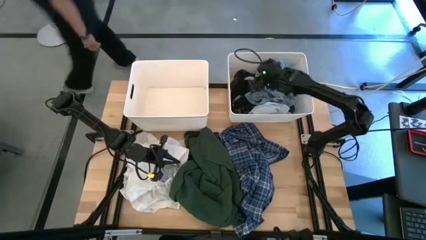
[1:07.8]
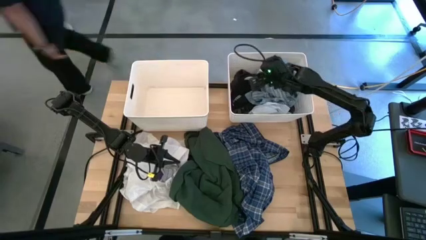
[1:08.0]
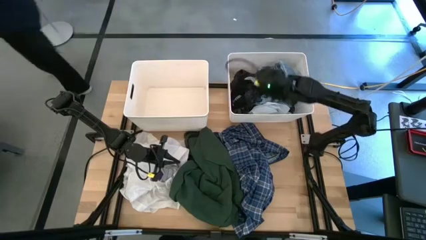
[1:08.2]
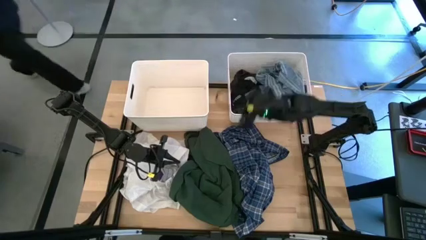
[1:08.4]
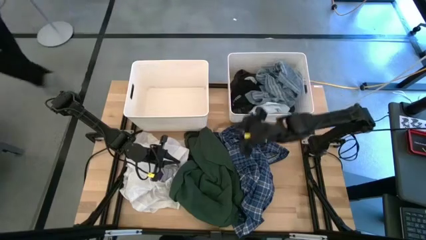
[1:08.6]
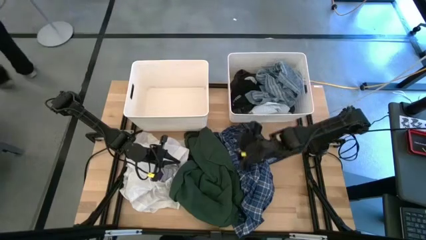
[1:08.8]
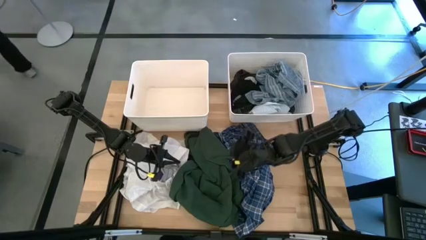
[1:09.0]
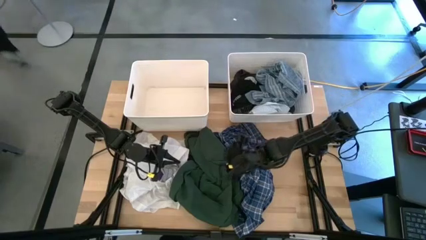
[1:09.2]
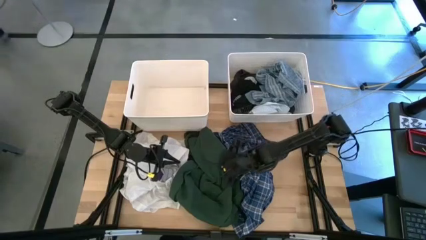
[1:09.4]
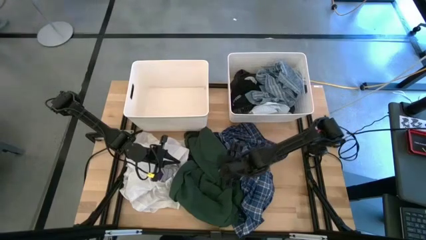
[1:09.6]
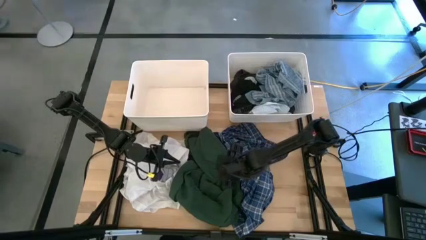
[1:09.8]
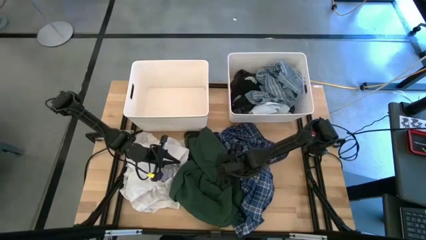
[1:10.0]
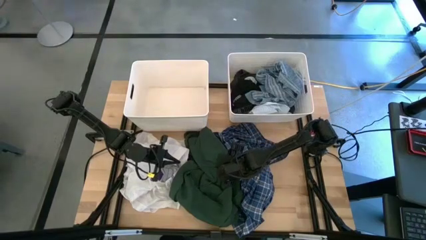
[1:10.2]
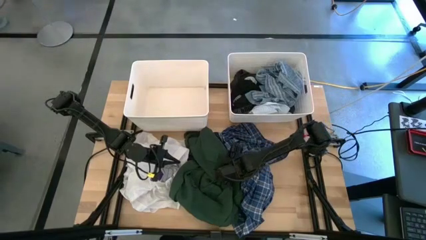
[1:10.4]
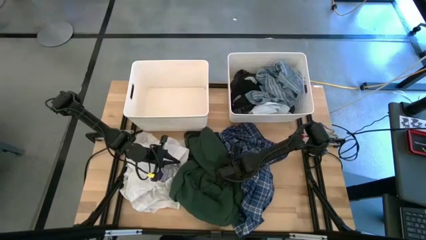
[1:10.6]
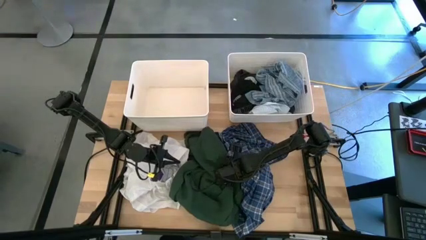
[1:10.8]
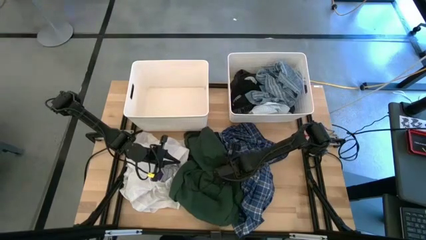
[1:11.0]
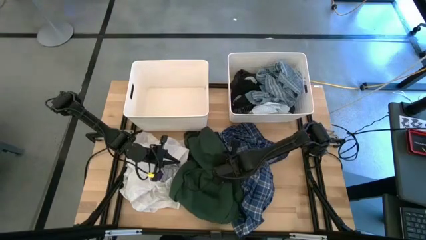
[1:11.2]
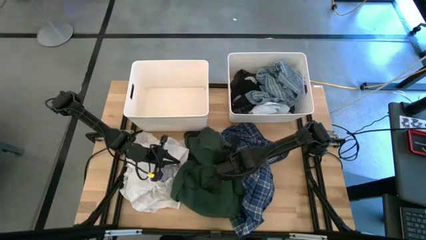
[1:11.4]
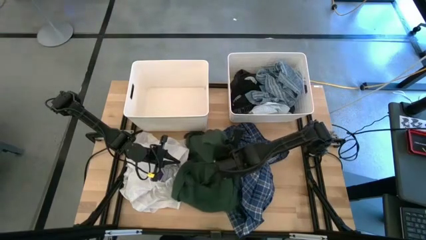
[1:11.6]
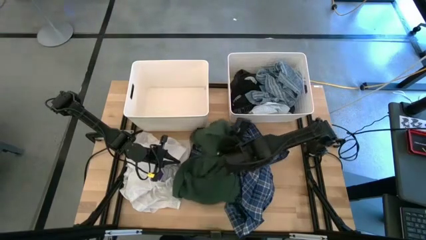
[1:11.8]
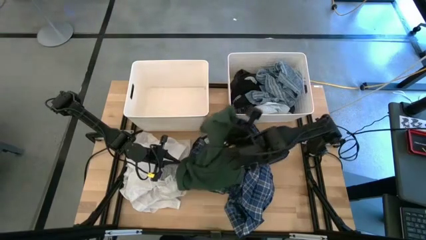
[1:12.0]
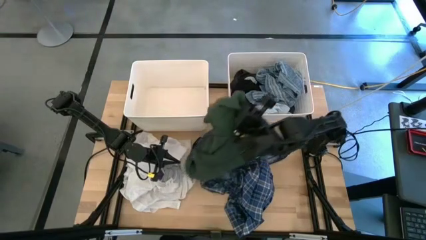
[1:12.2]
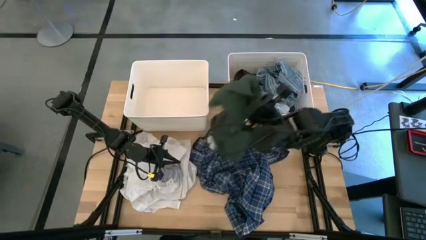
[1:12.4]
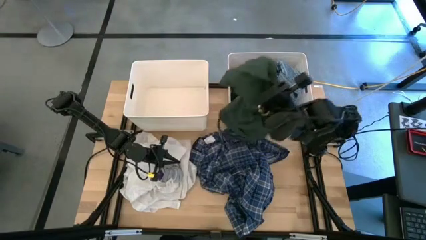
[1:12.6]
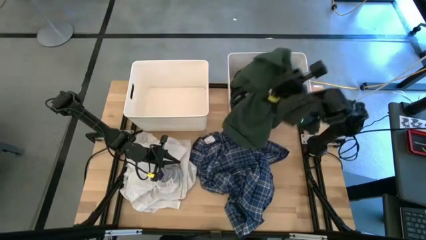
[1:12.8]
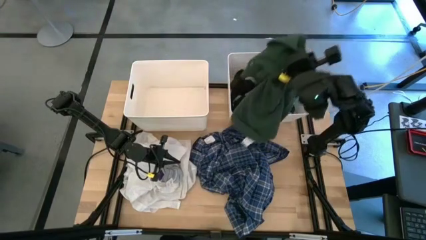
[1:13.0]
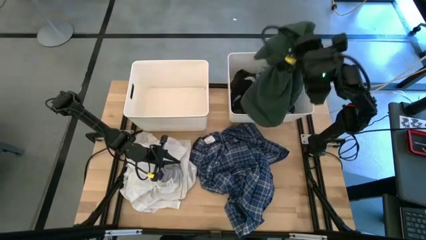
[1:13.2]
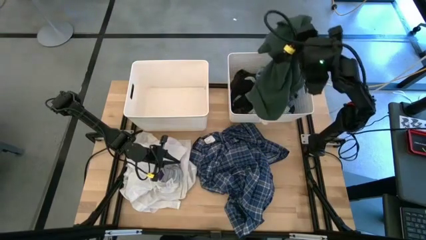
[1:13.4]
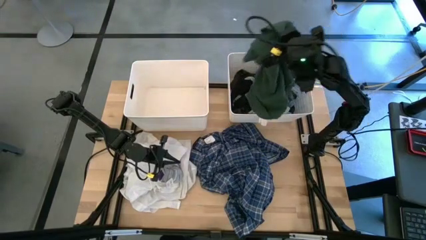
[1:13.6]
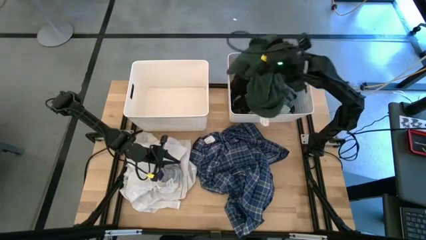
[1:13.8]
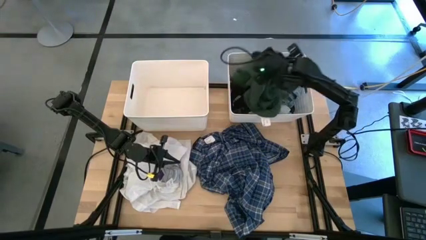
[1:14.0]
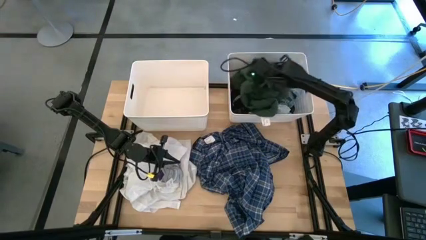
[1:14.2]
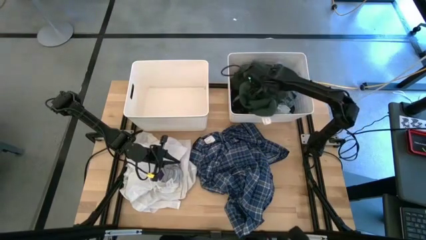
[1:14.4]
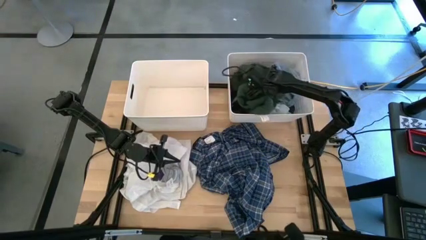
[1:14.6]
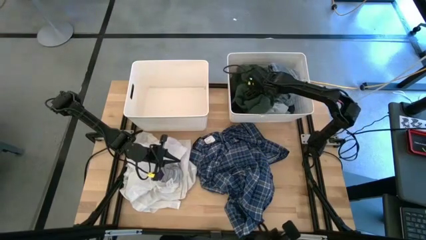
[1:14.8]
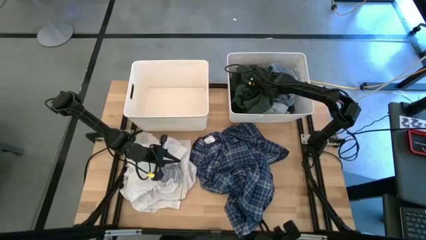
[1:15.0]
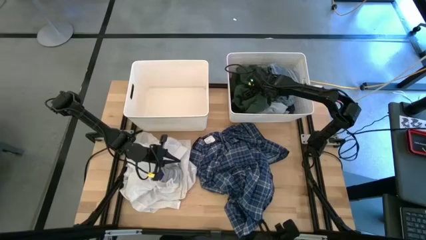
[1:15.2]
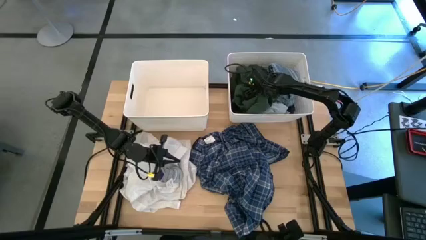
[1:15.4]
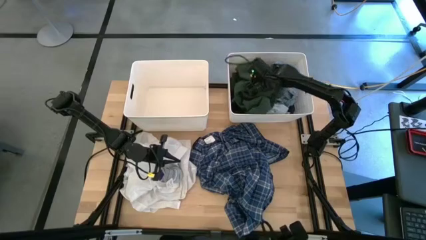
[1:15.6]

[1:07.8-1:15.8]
Task: Sort clothes
Put the green shirt into the right white bin

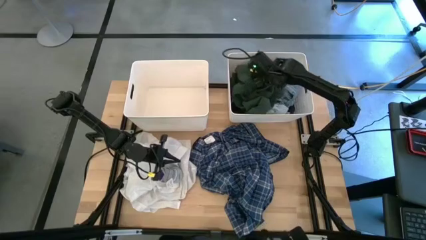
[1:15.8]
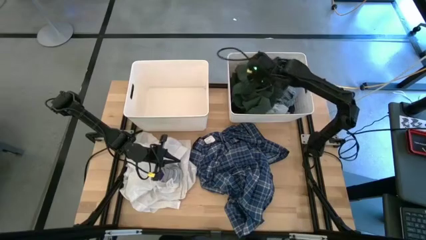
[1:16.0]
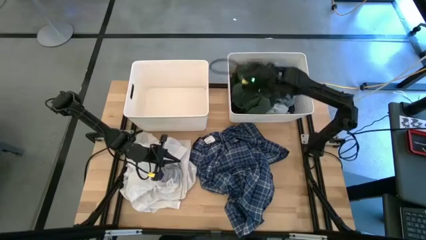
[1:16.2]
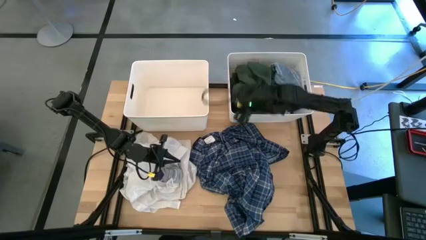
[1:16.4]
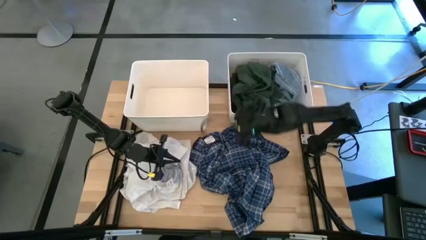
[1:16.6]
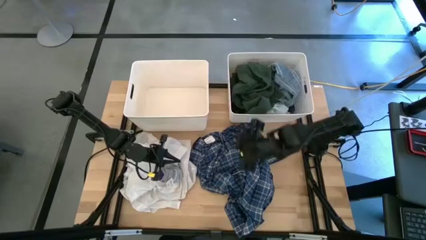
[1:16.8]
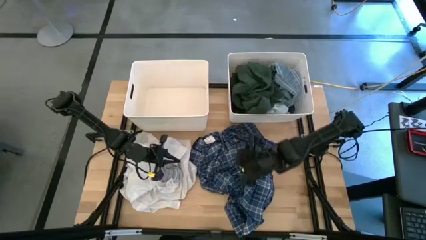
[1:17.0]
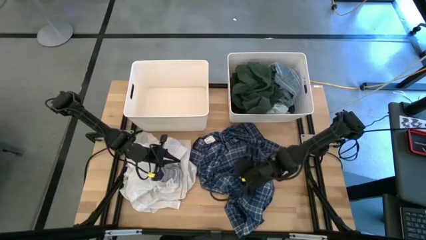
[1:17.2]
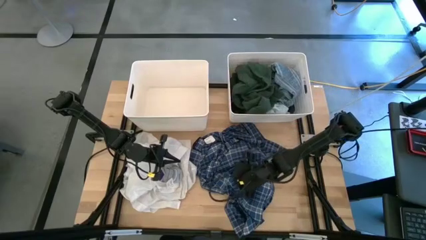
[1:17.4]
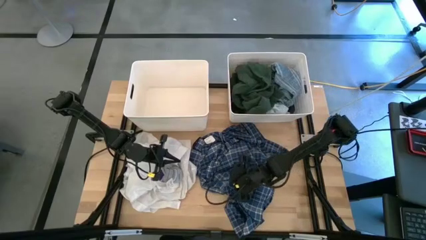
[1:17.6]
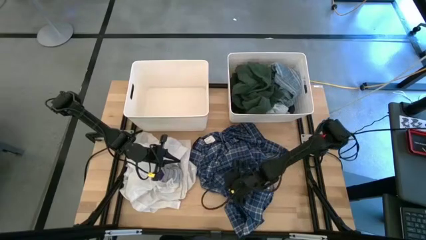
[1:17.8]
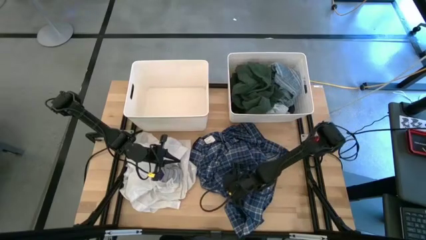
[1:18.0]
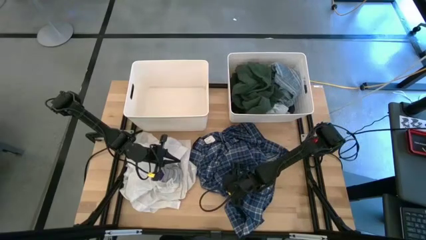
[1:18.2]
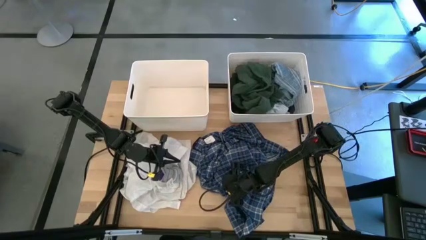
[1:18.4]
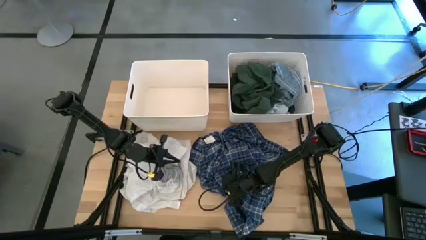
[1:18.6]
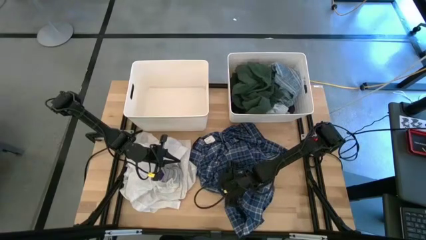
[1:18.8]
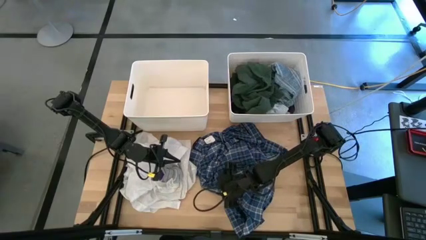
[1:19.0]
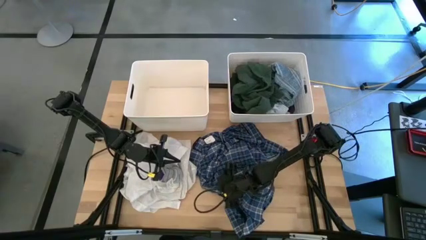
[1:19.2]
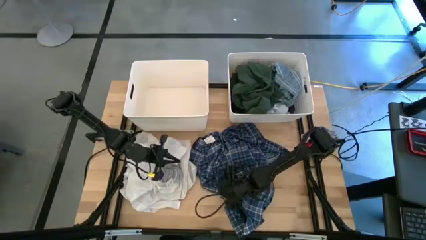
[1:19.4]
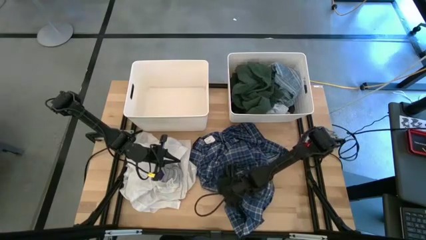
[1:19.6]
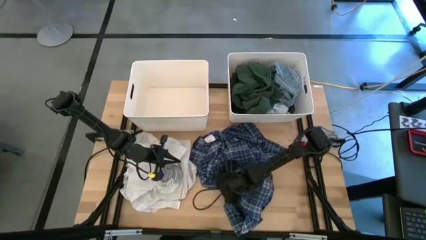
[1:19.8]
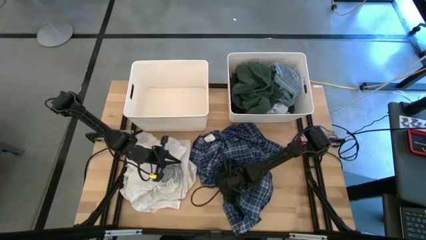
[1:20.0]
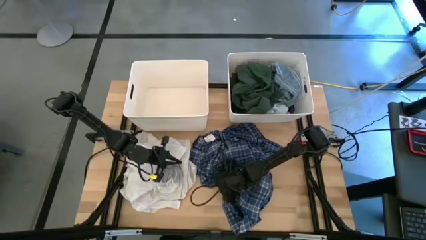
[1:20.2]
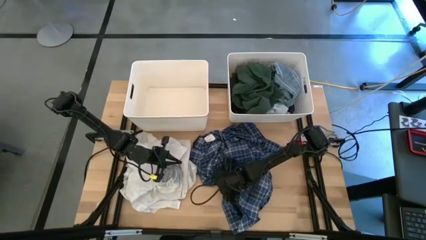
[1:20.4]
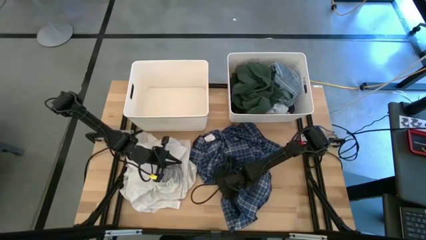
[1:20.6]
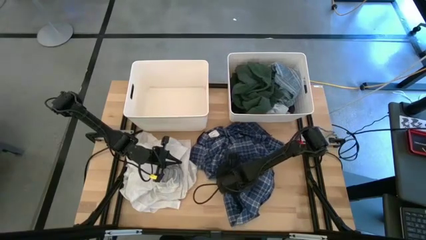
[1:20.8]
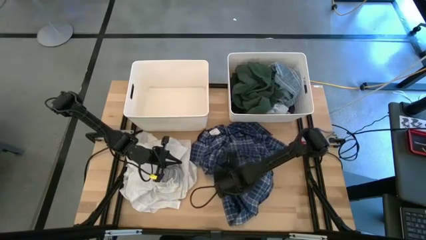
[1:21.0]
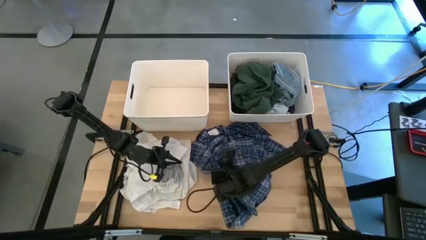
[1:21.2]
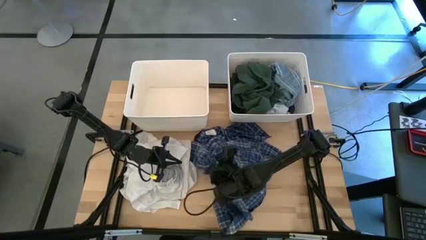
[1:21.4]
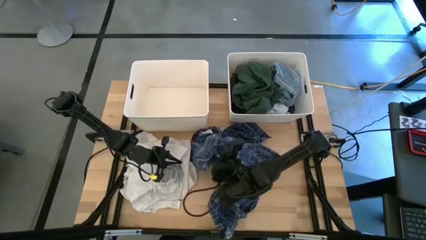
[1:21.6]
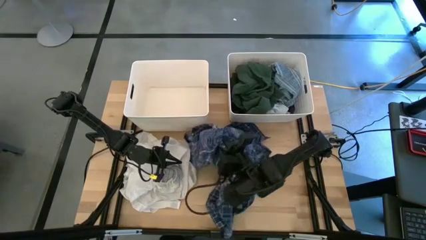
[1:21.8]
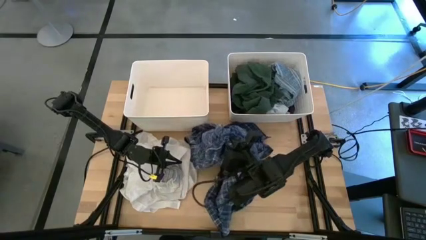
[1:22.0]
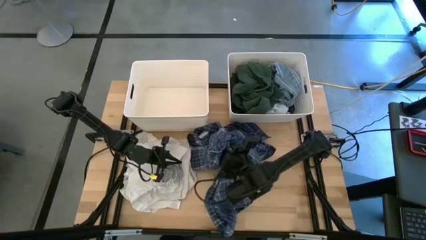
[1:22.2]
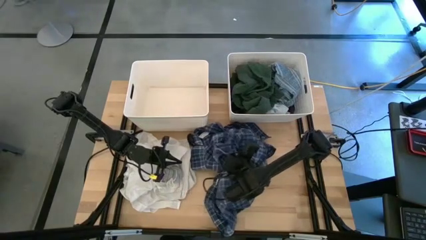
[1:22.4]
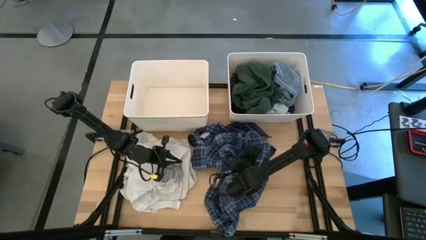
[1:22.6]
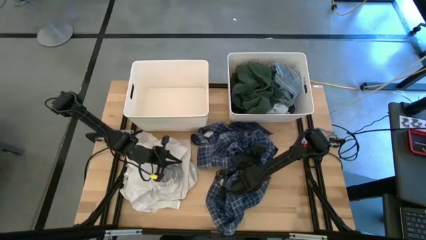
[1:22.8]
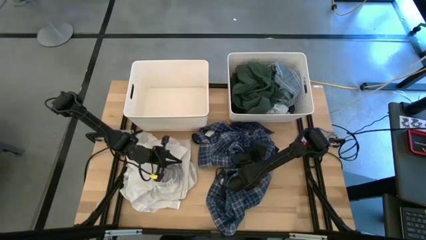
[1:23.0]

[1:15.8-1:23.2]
Put the dark blue patterned shirt into the right white bin

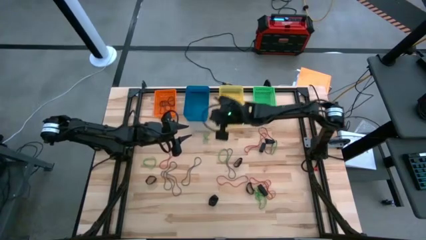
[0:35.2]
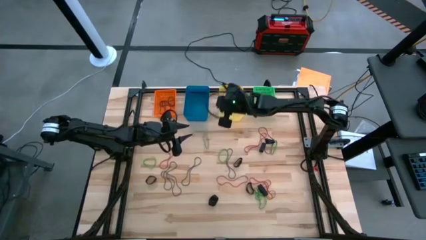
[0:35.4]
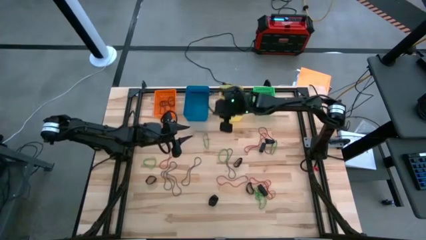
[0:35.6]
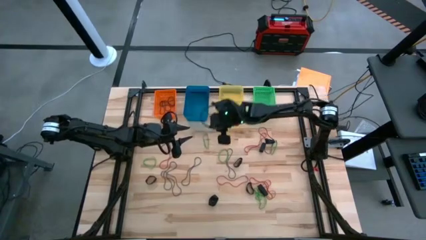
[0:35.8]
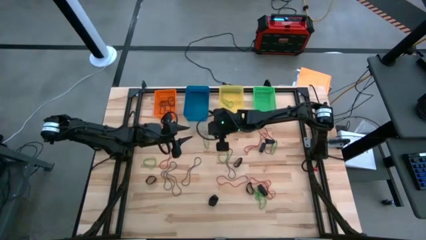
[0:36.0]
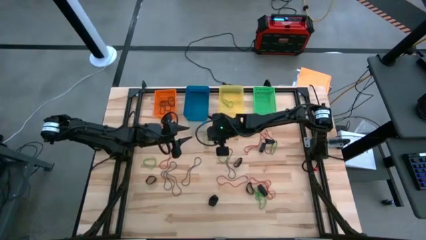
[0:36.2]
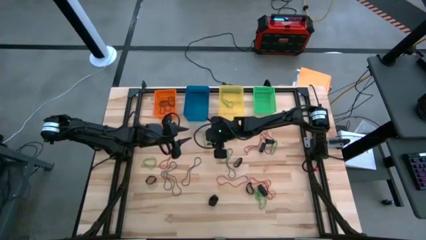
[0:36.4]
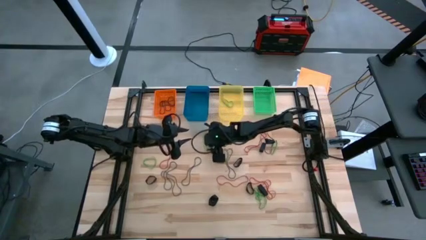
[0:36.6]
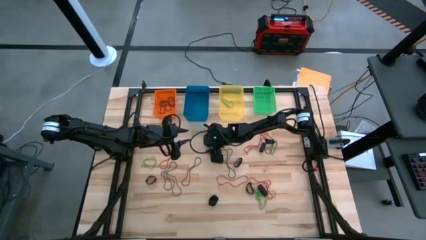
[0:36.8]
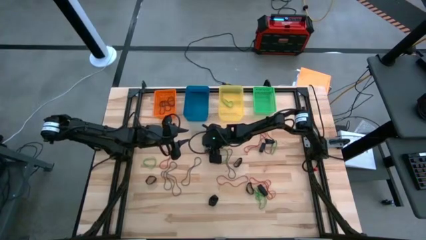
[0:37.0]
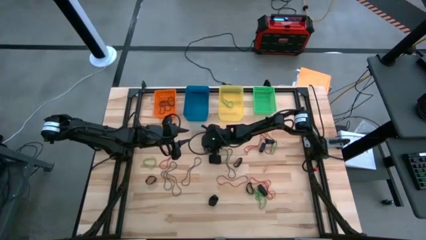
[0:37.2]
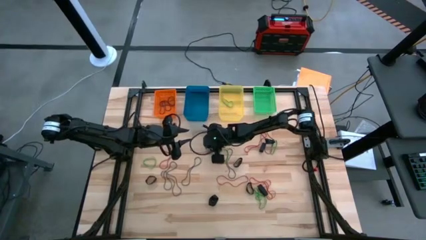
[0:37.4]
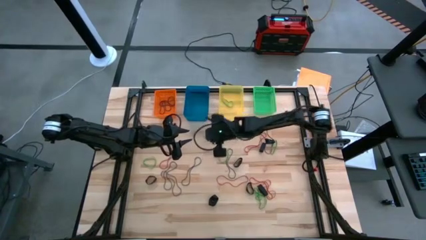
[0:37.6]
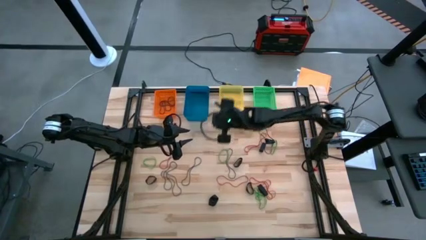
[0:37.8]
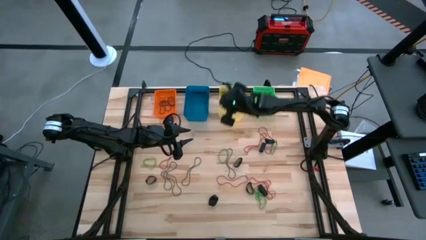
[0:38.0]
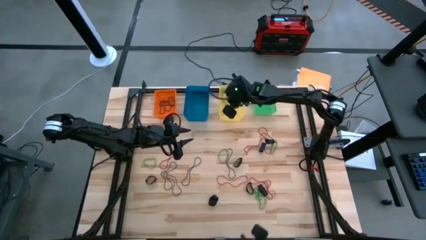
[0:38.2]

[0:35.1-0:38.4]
Task: Sort rubber bands into baskets
Put the green rubber band into the yellow bin
